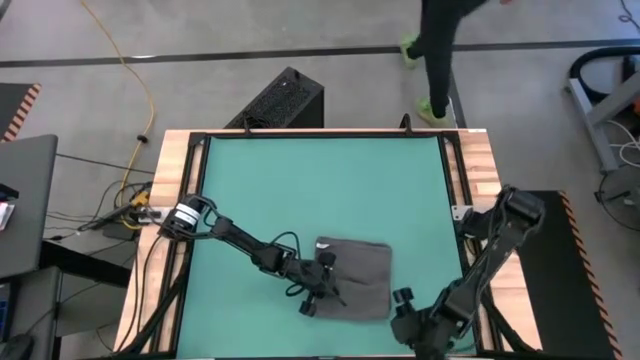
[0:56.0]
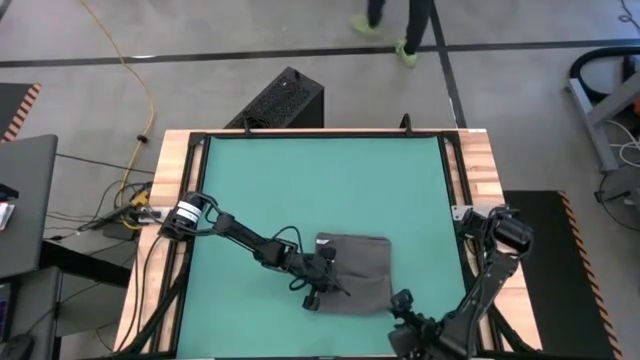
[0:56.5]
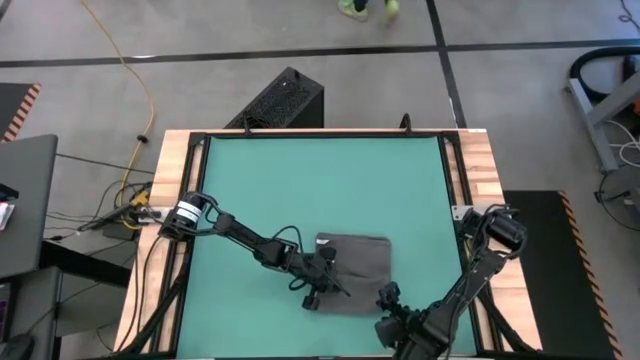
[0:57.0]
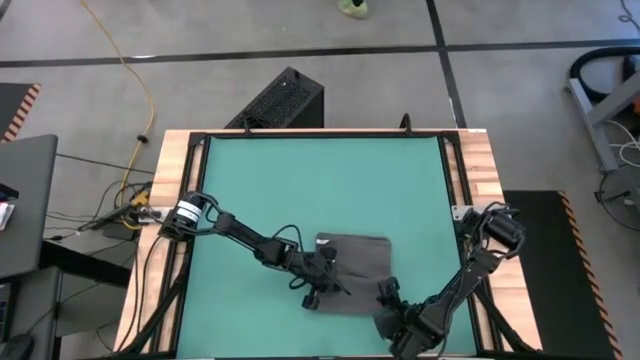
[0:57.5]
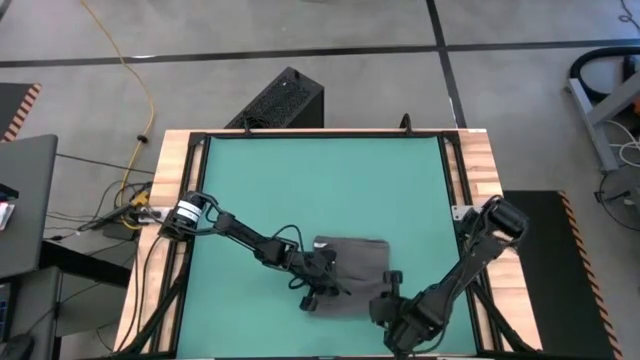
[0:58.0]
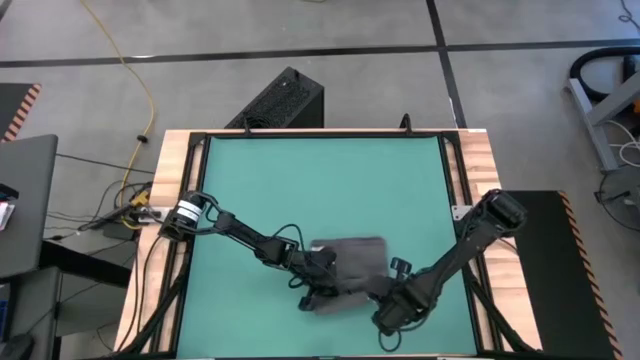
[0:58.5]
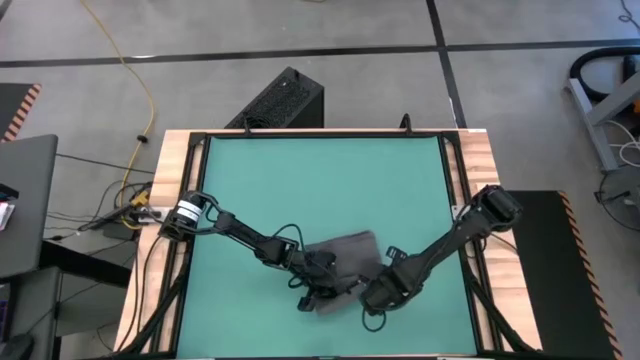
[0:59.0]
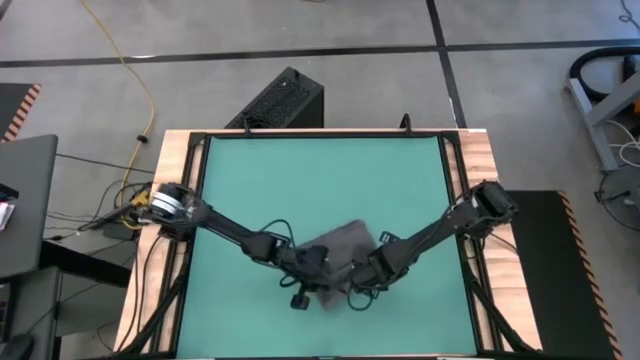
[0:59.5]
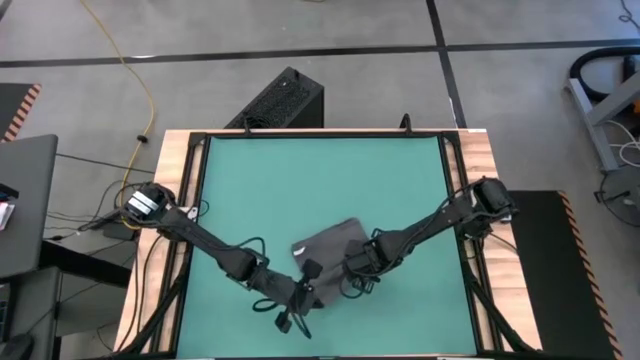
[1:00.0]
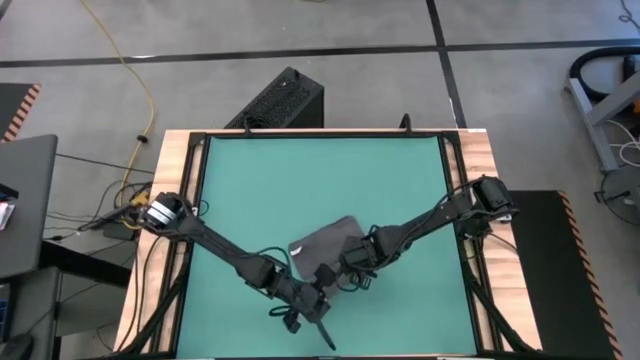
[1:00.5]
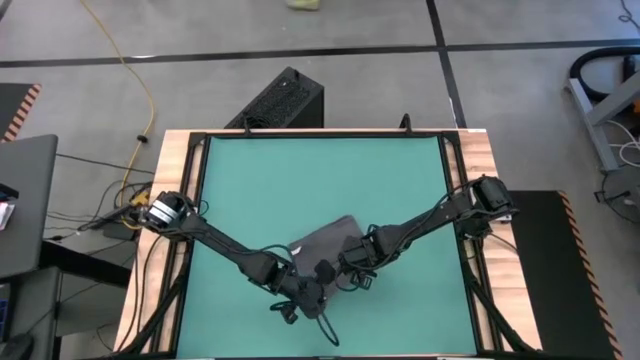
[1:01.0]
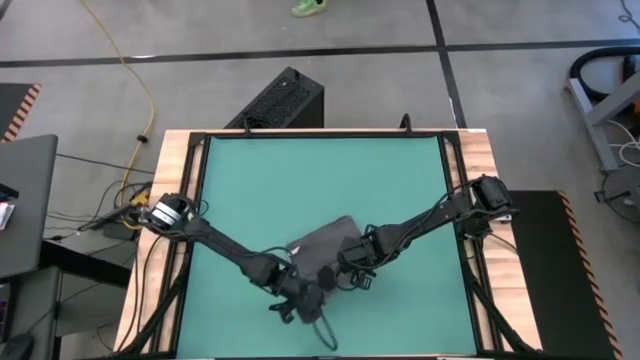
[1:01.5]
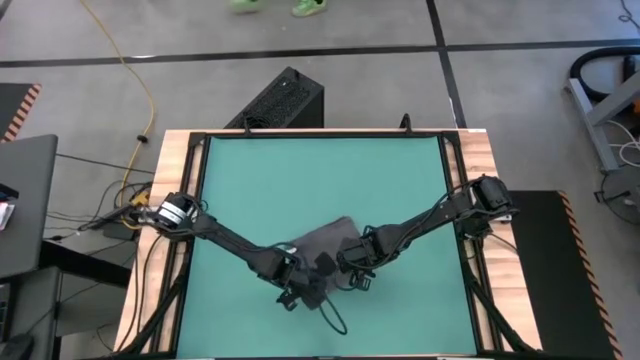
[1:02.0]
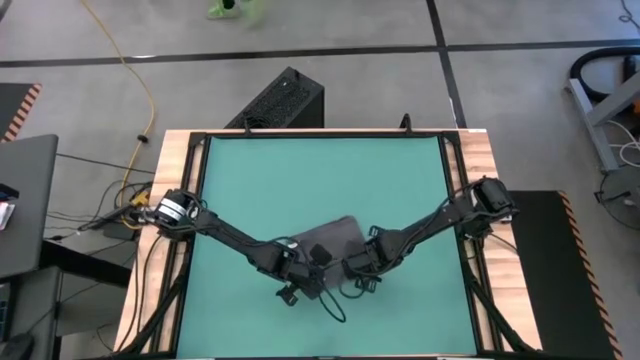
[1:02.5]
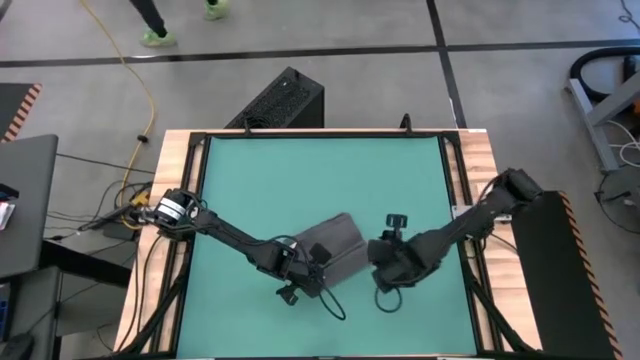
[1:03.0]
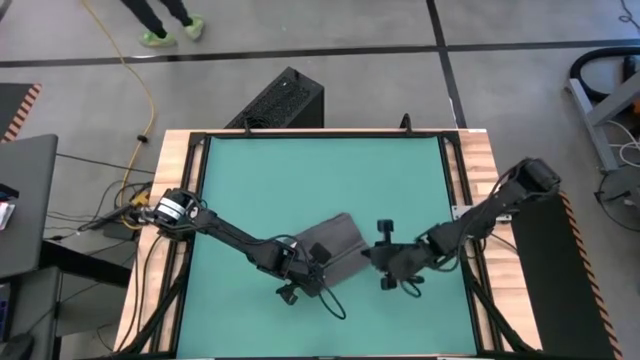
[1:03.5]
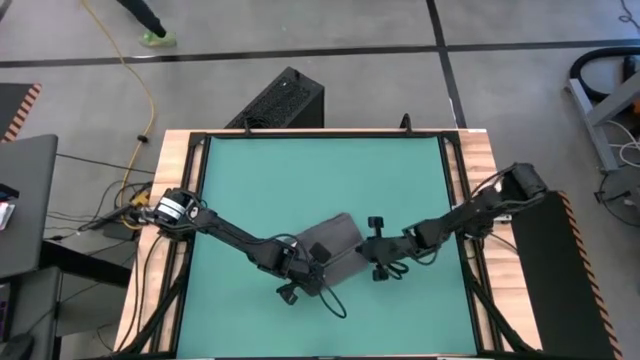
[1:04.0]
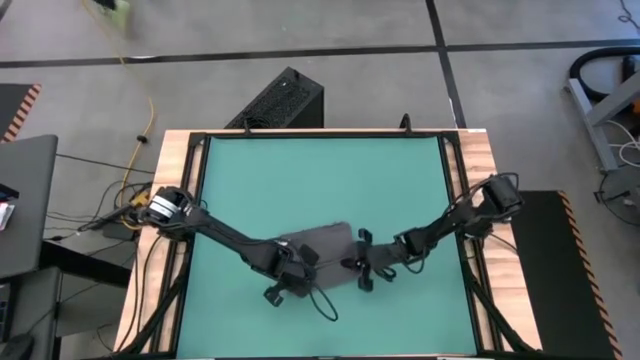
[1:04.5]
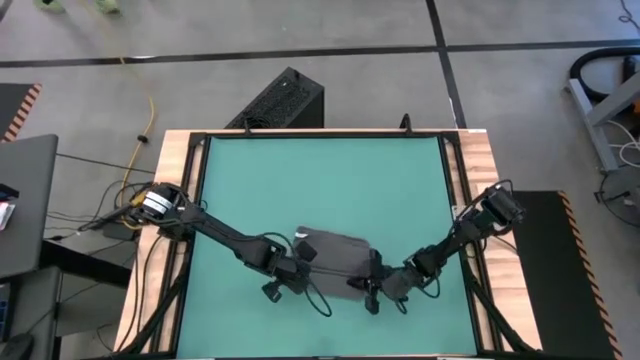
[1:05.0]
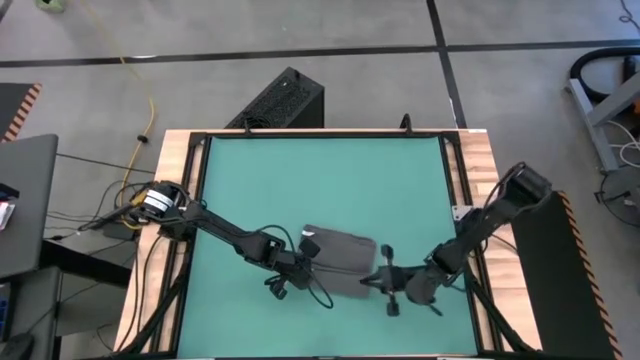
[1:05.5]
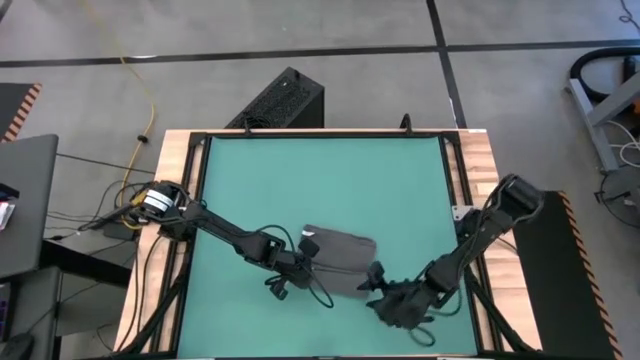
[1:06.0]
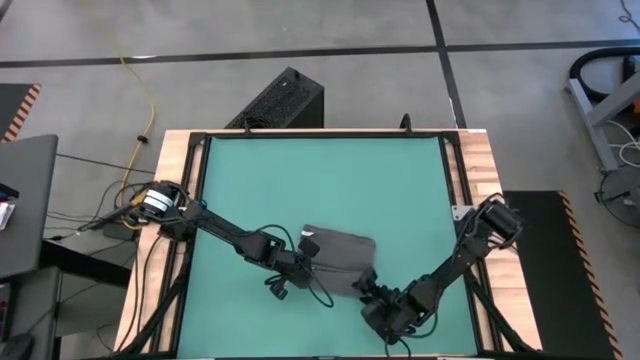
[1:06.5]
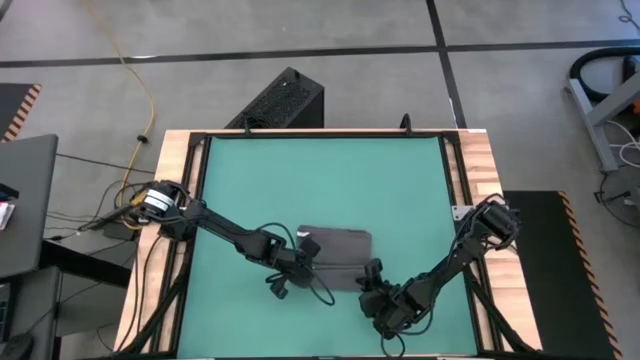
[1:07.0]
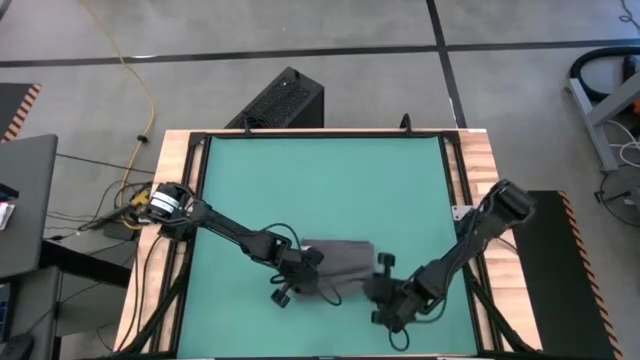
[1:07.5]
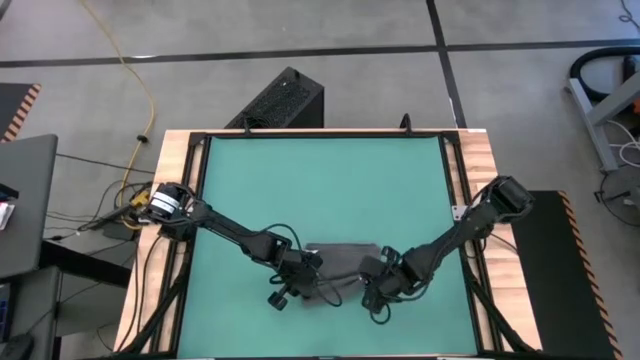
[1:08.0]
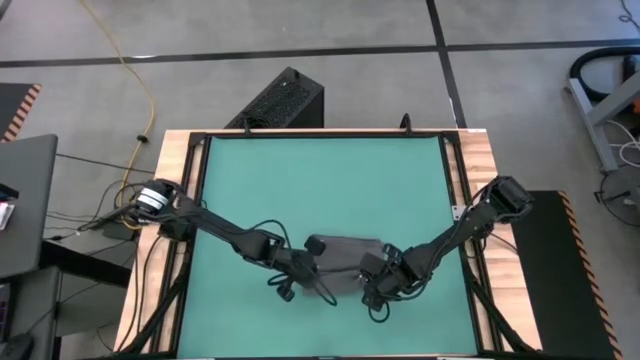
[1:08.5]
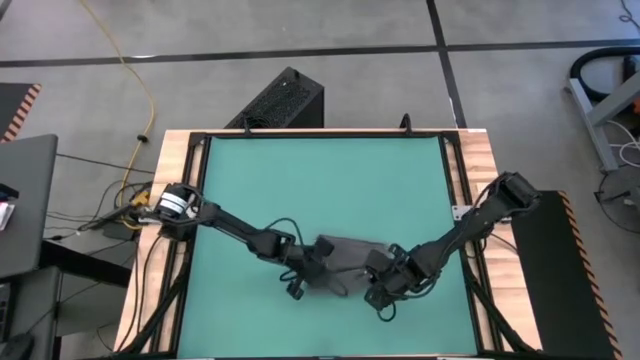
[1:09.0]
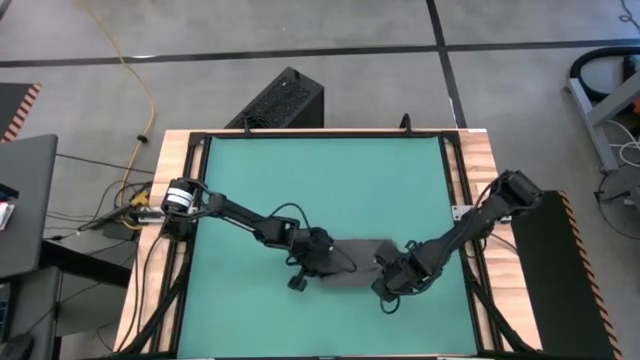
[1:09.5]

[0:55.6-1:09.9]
Task: Roll towel into tight, uniform cylinder
Roll the gray towel

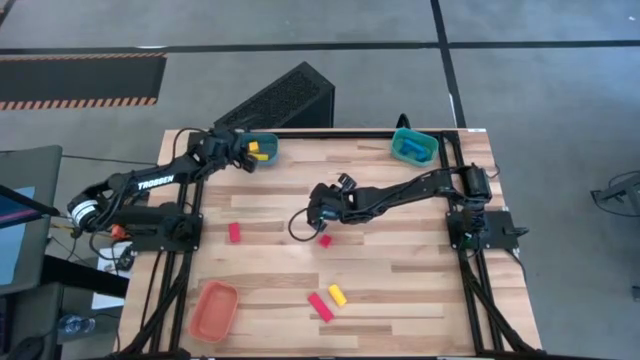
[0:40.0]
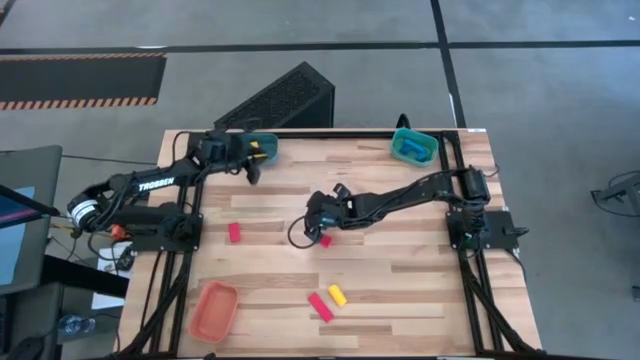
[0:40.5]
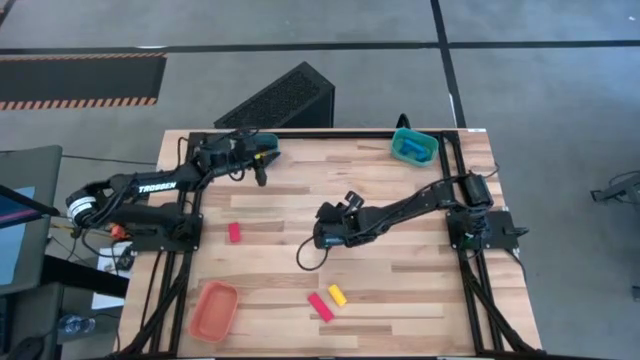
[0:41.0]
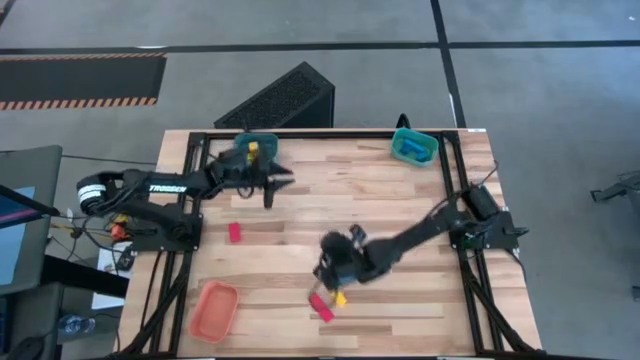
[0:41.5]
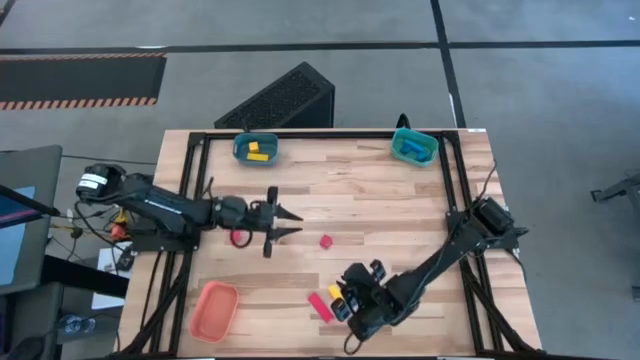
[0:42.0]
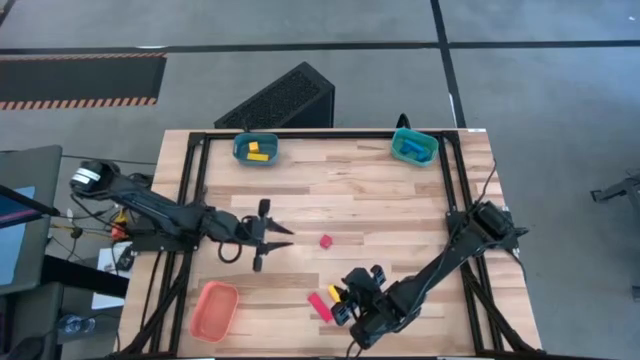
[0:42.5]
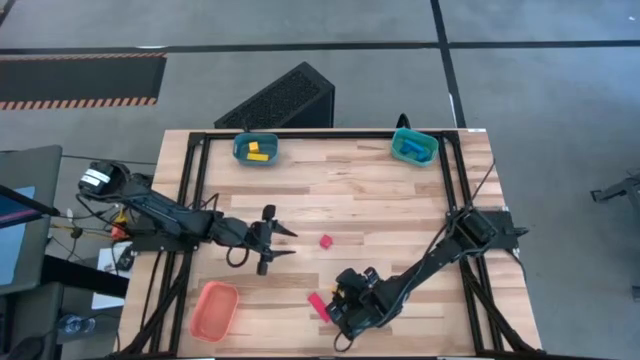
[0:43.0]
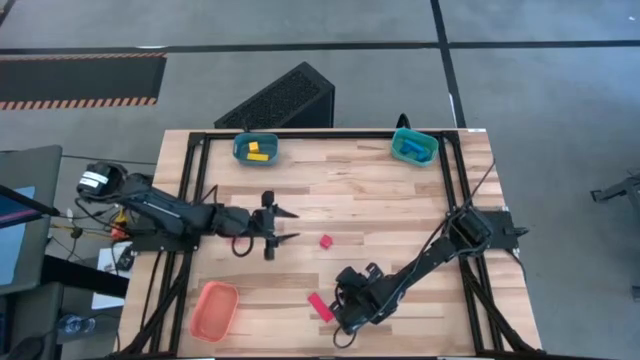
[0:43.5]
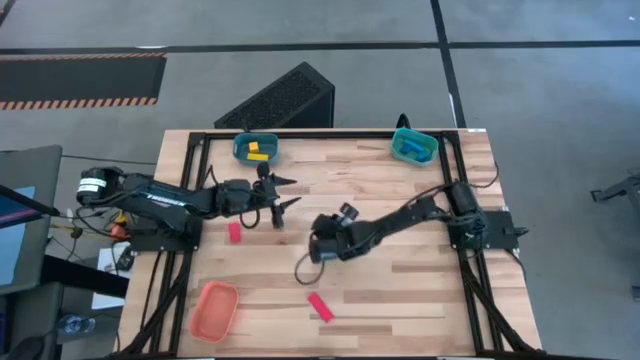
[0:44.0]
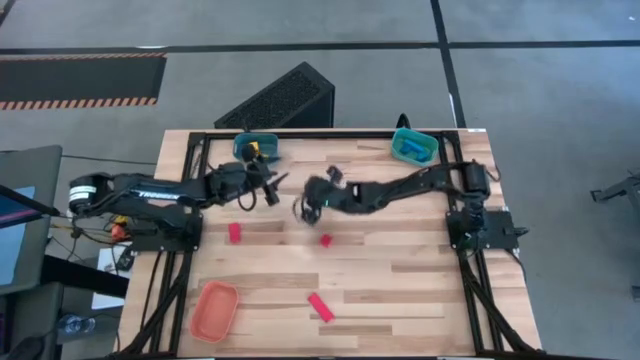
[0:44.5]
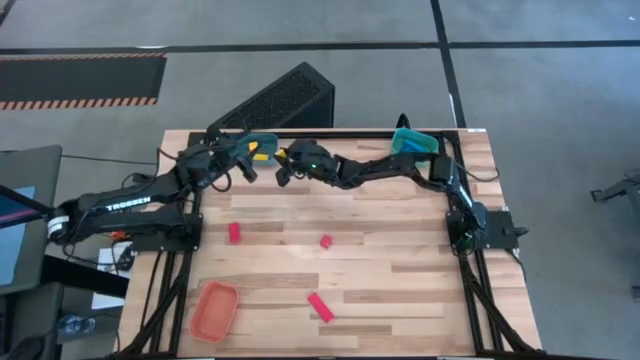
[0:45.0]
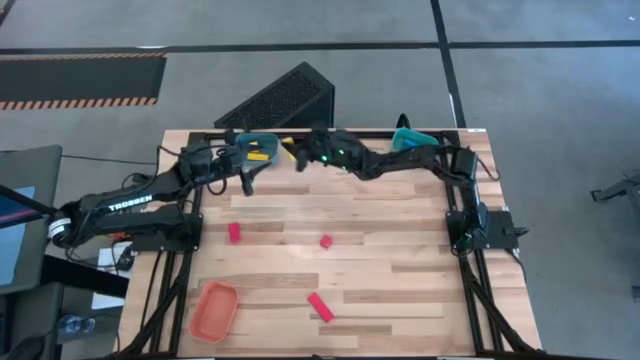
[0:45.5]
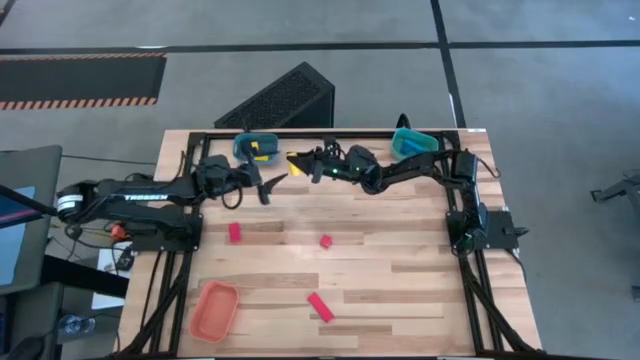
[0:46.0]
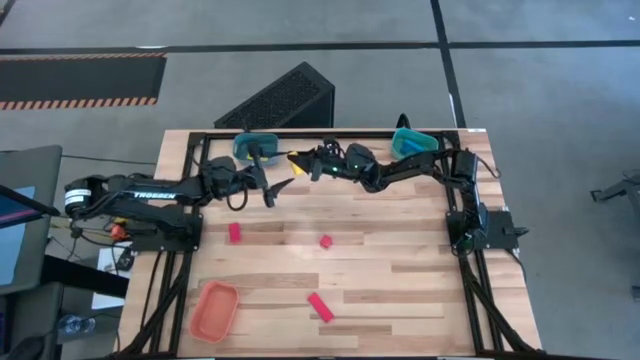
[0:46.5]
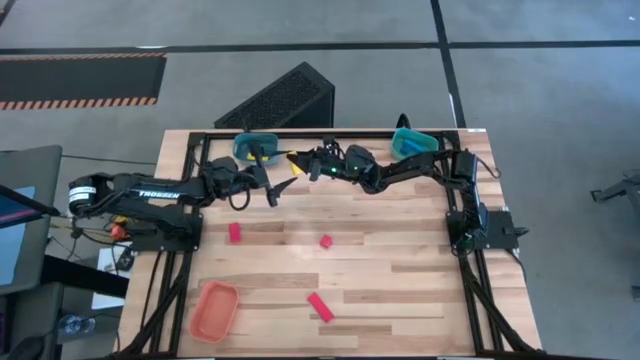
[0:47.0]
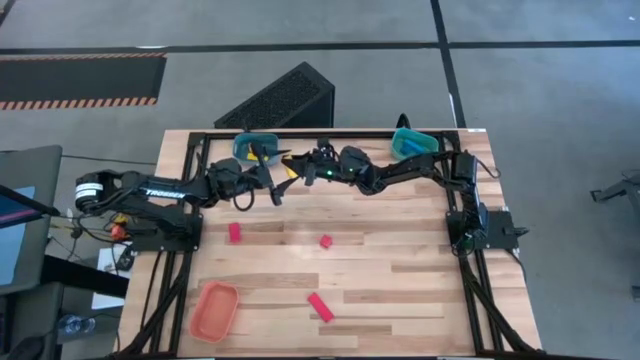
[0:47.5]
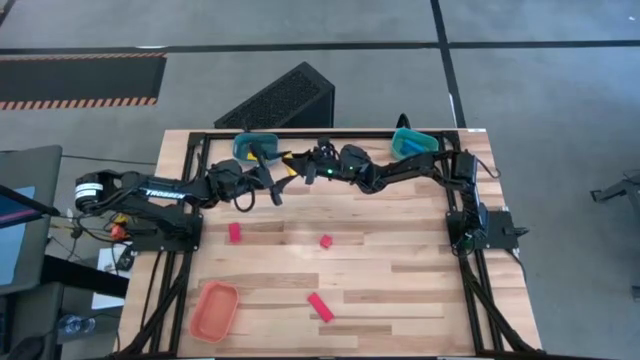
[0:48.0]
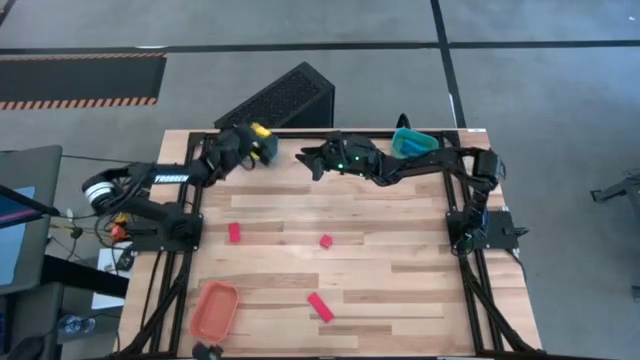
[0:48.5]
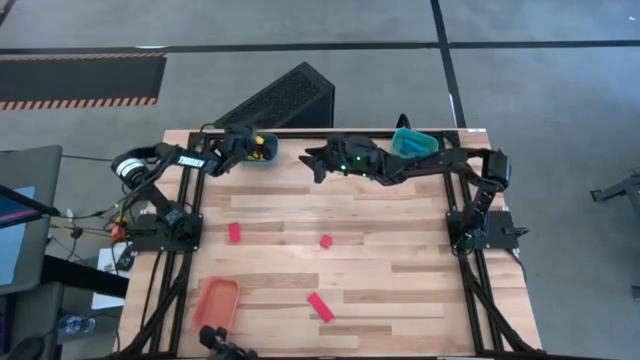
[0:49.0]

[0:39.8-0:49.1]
Task: Sort & place blocks by color
Put the yellow block into the blue bin
